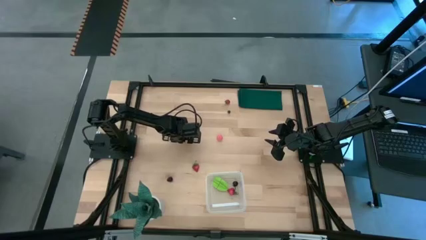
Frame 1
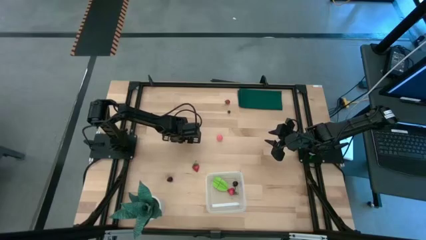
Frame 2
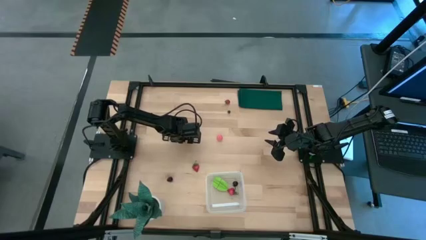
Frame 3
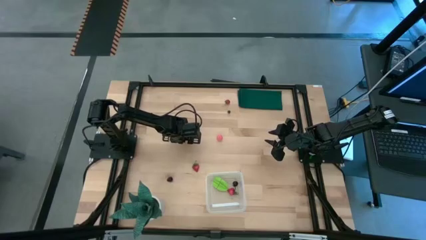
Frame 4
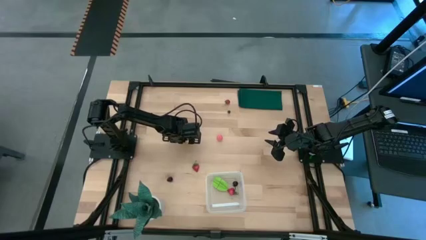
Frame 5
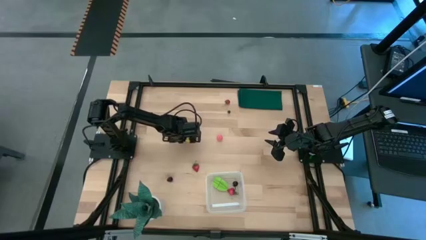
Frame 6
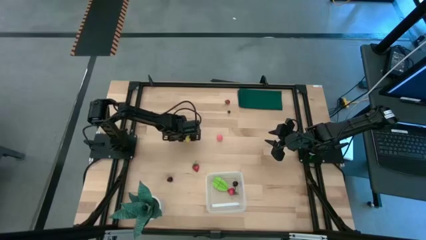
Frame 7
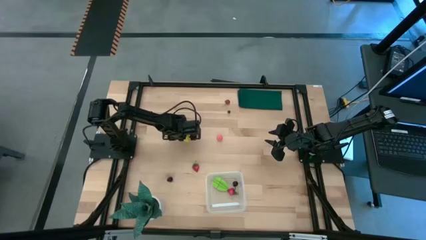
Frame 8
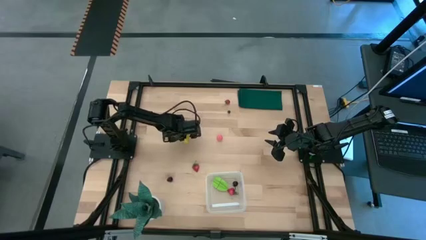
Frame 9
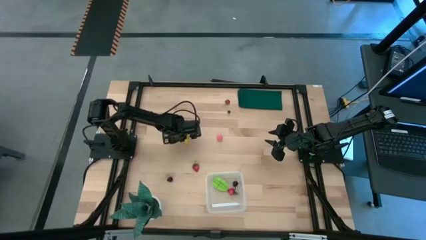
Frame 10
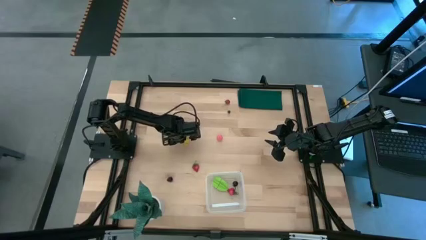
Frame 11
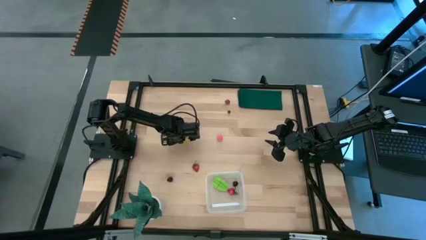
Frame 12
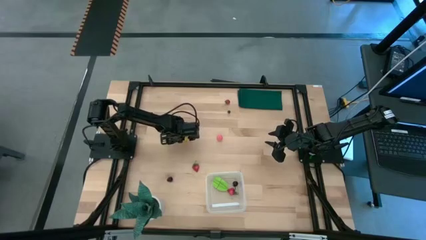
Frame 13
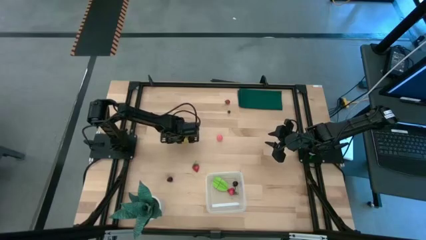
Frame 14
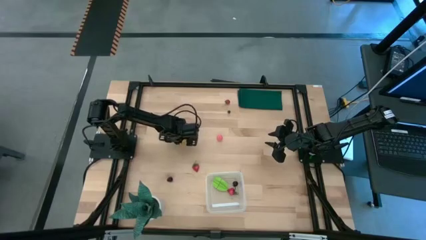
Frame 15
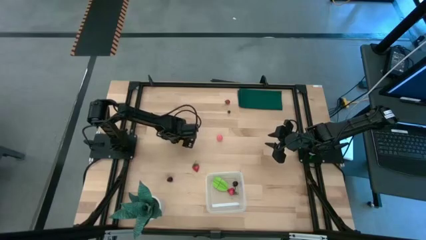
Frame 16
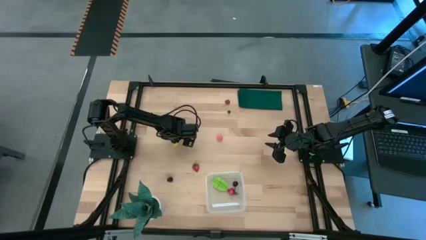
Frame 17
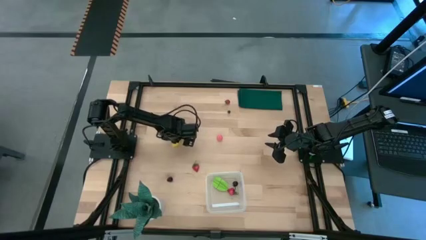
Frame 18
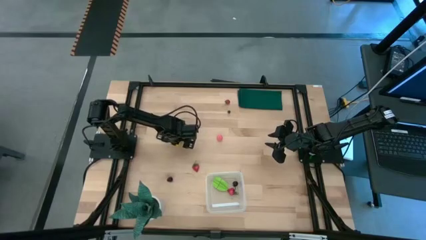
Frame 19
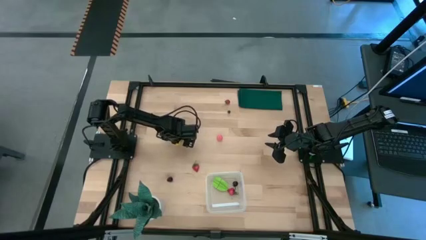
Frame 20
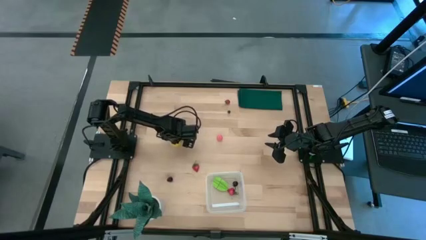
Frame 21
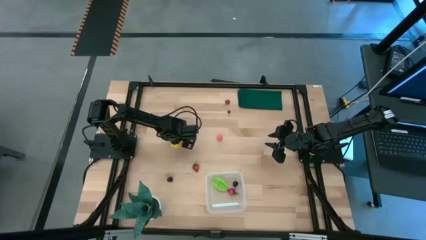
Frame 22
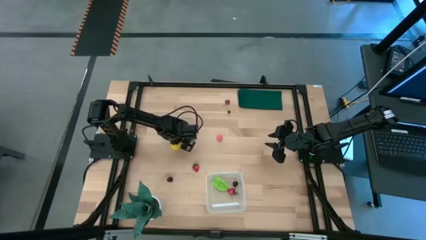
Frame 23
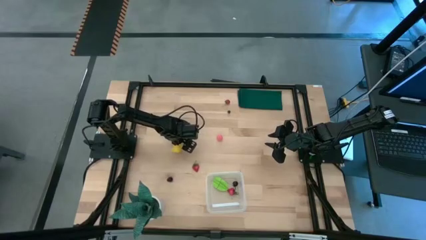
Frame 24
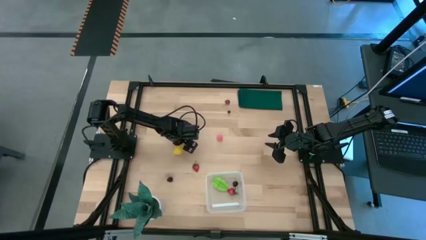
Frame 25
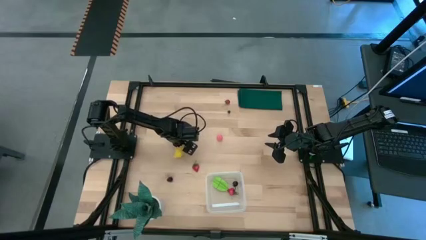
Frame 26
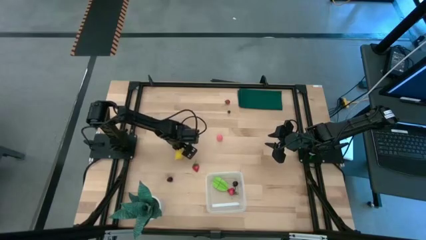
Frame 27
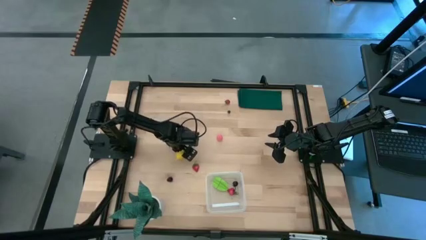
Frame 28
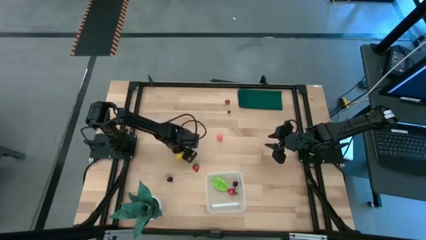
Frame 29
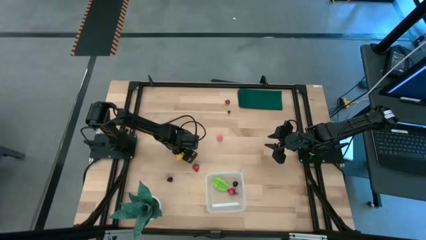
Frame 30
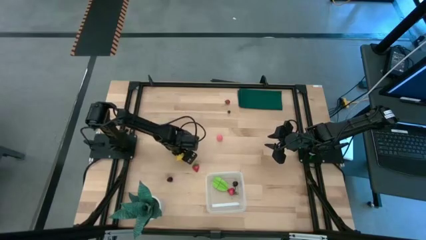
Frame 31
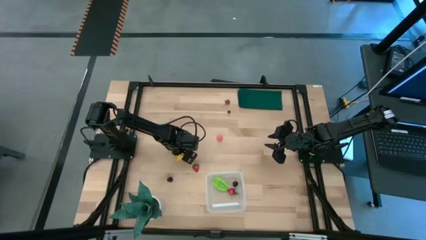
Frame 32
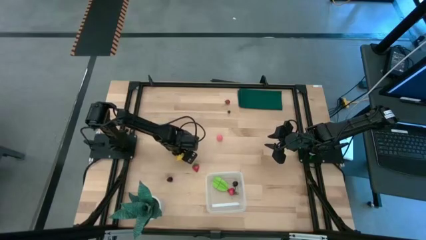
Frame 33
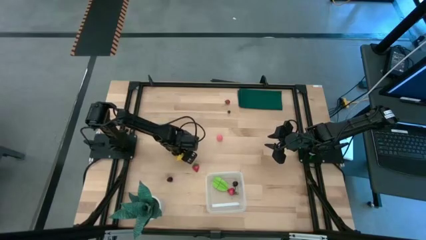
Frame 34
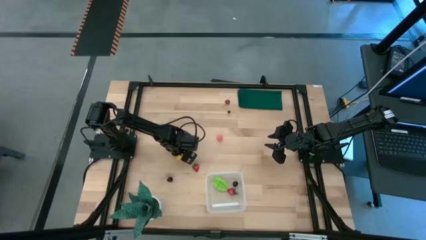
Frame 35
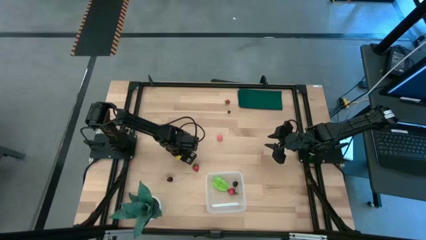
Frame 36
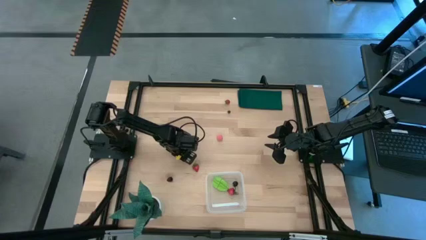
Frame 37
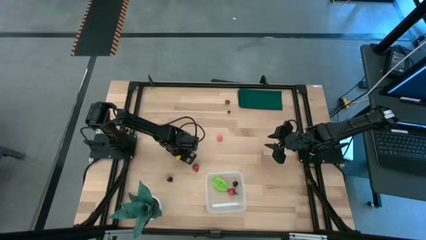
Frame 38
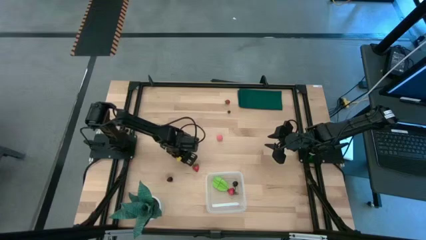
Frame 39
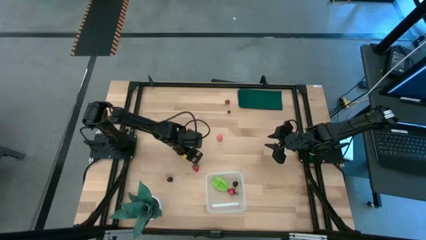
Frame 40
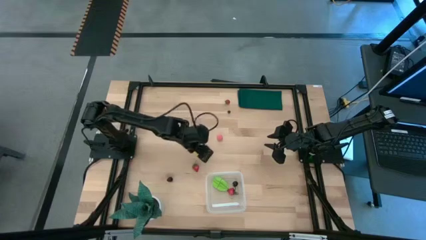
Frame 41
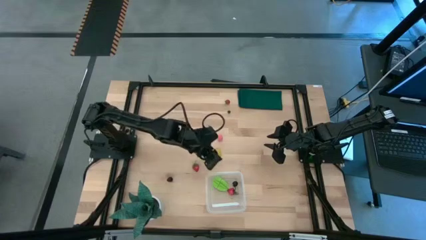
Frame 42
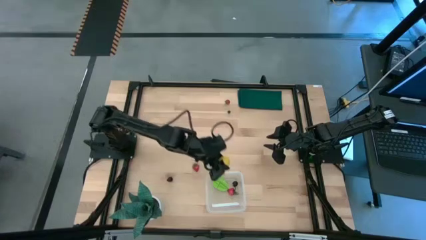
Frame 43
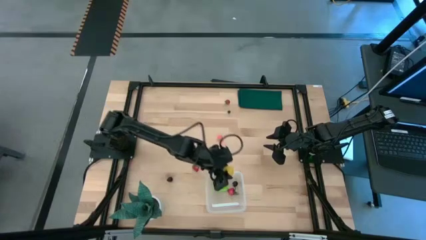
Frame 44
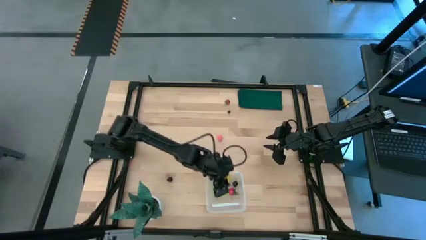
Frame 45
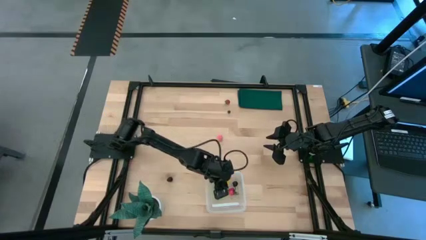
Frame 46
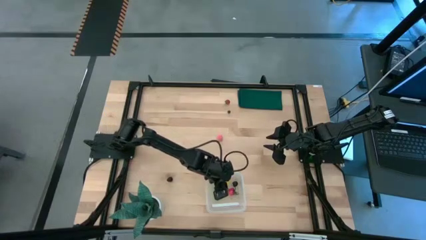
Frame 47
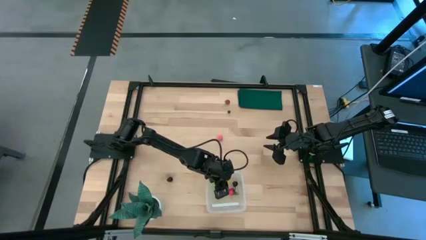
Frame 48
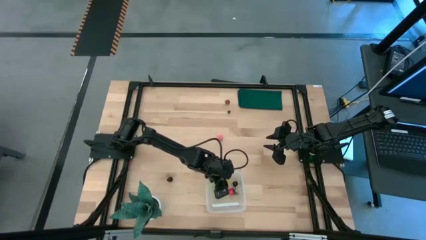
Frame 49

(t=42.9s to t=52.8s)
Task: Pick and placing Produce into tupperware
Put the yellow lemon into the transparent bin

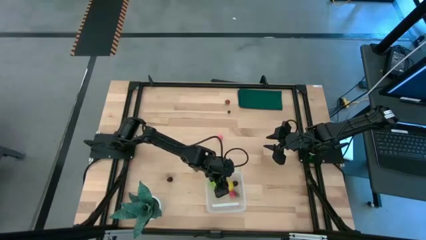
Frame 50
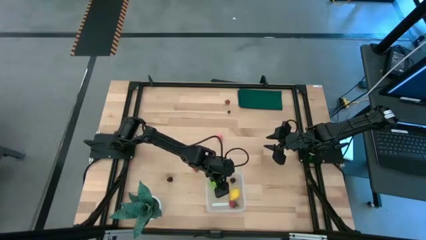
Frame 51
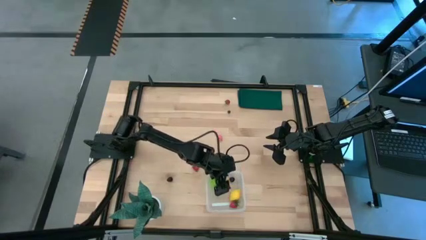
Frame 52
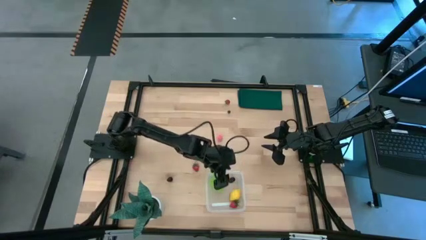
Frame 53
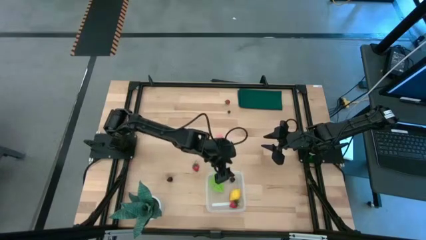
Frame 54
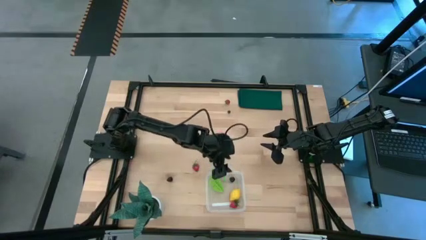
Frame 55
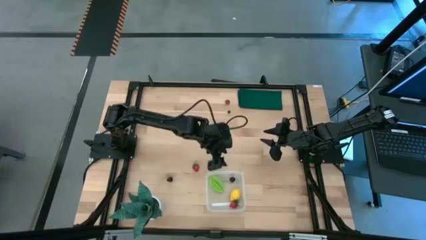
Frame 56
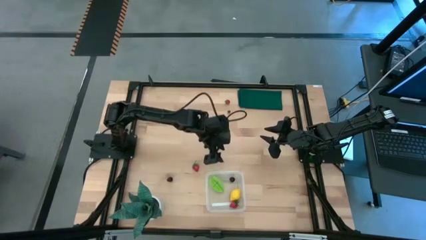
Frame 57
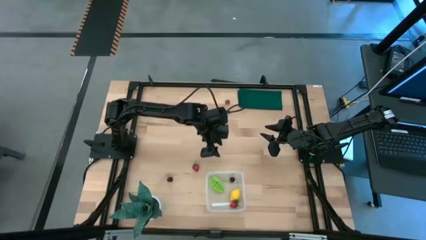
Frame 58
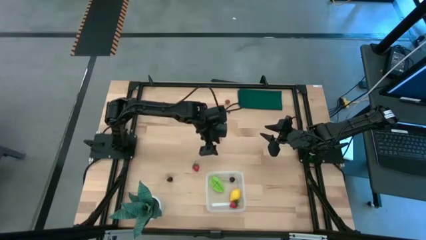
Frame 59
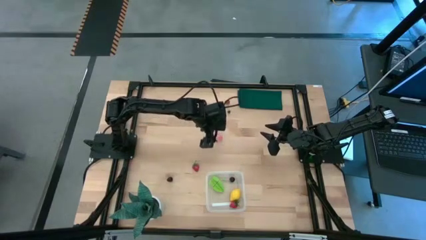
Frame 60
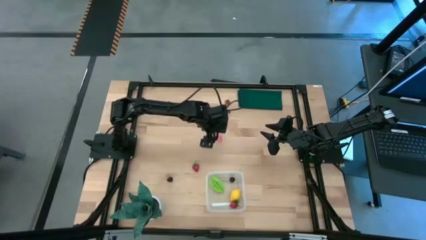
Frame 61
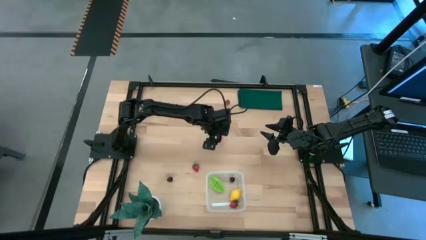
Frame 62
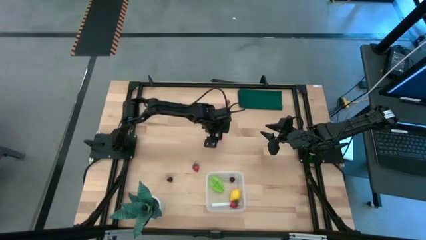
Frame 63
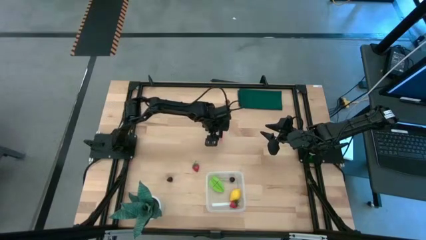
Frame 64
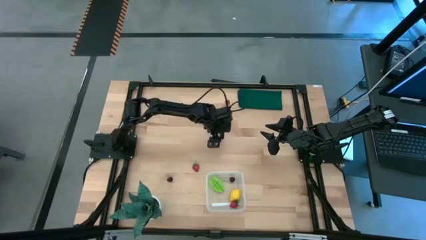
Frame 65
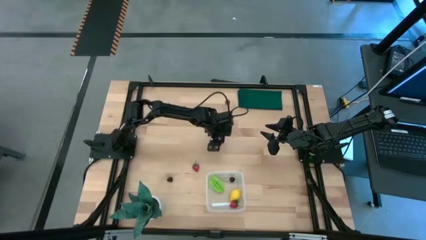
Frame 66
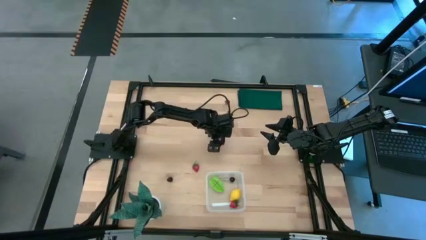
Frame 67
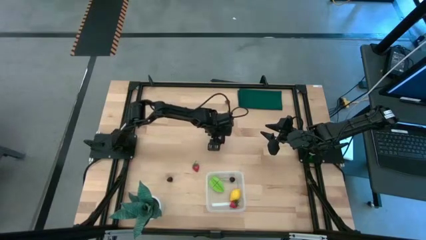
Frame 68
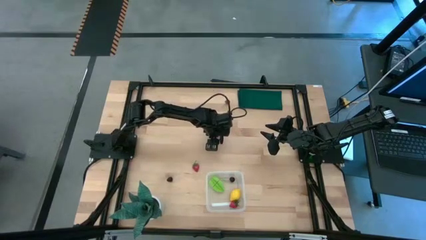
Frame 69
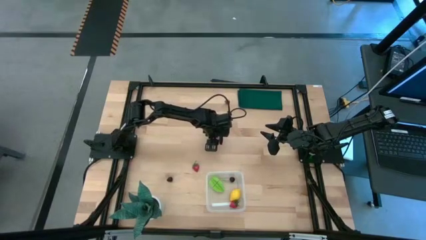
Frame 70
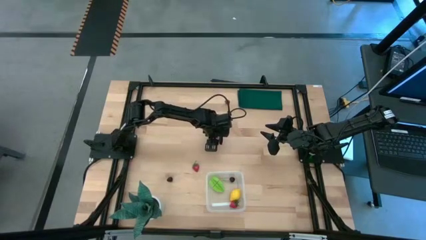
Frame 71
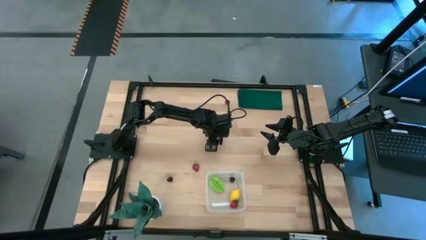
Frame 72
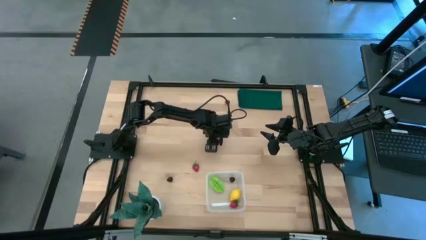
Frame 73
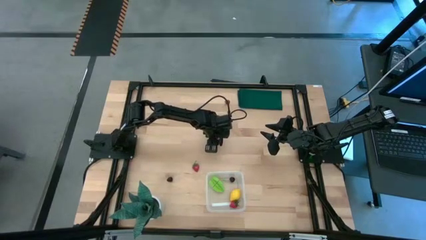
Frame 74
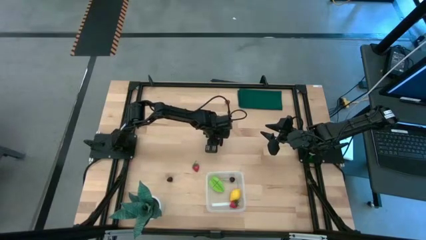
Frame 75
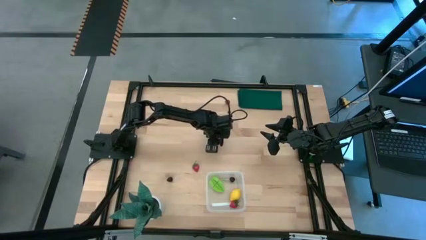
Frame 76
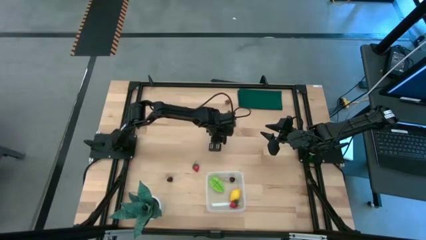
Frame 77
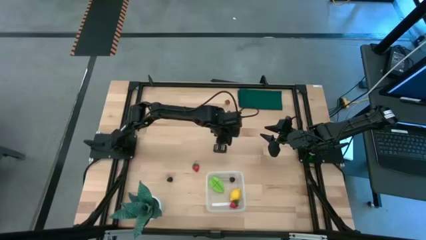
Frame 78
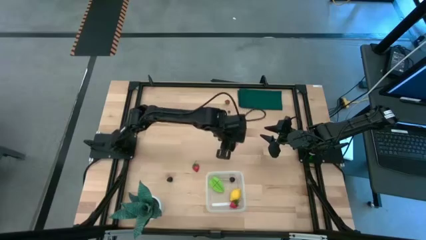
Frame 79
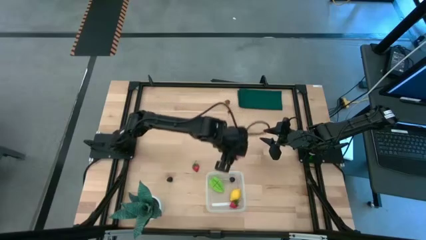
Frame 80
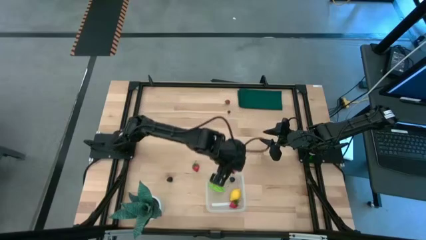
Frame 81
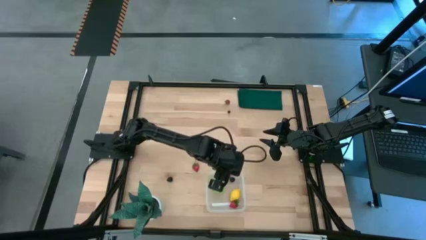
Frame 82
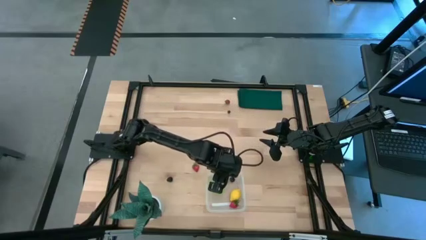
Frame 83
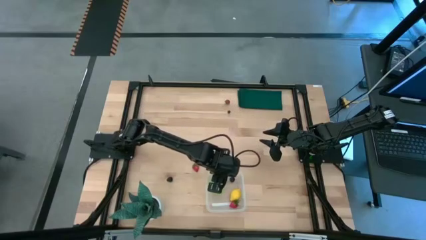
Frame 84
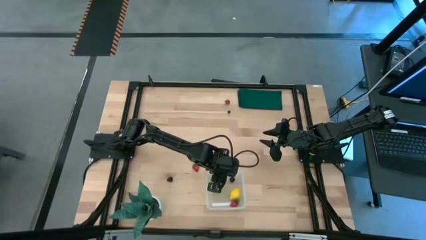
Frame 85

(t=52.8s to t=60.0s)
Put the pink peach into the transparent bin
